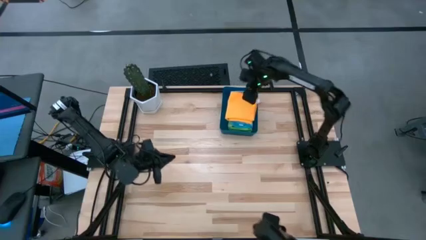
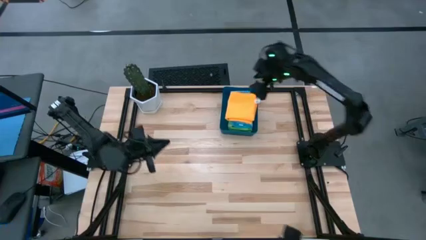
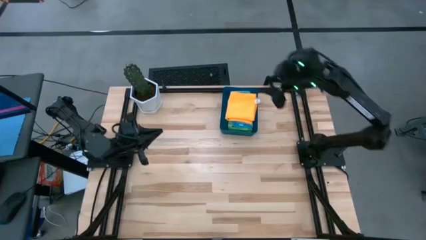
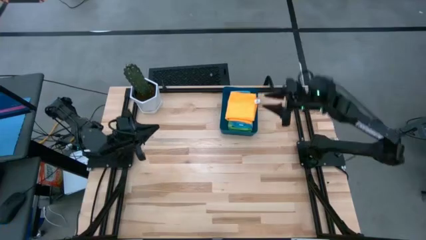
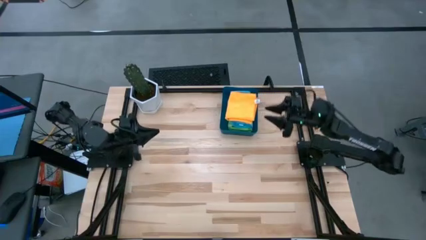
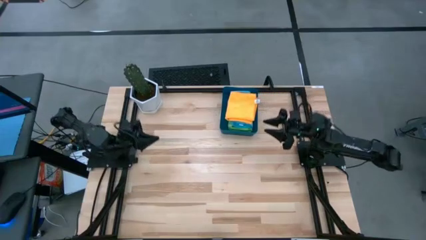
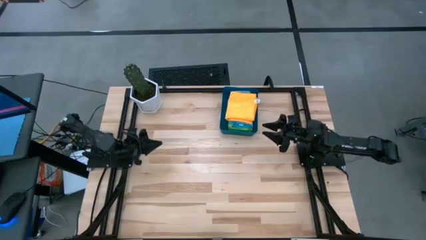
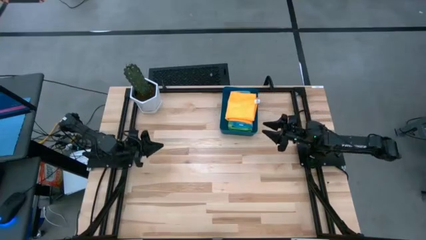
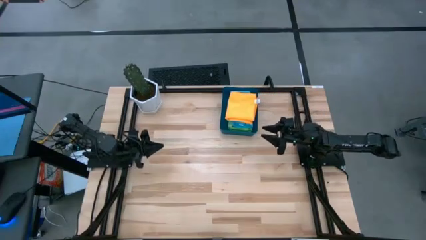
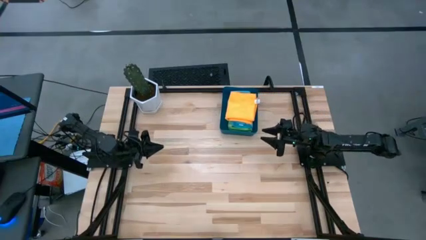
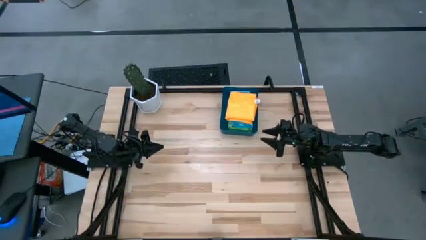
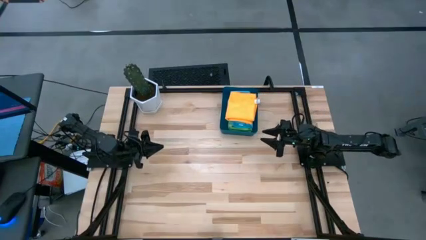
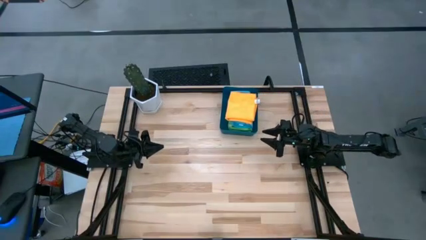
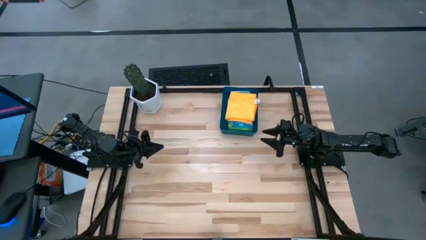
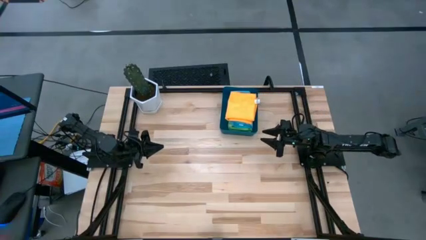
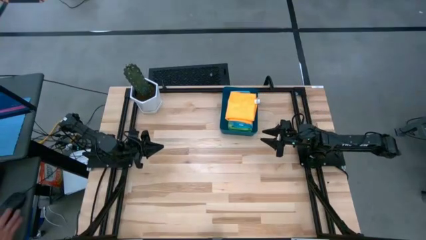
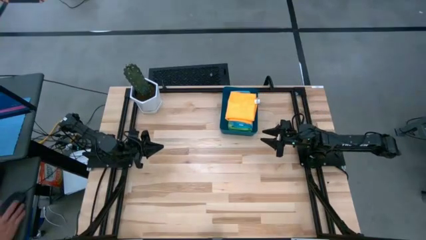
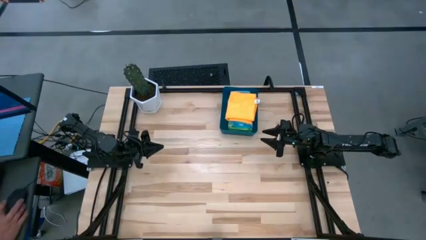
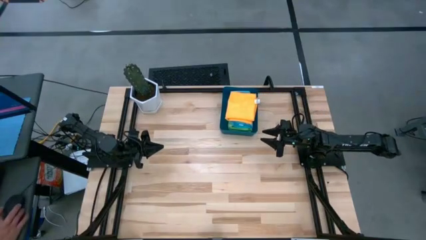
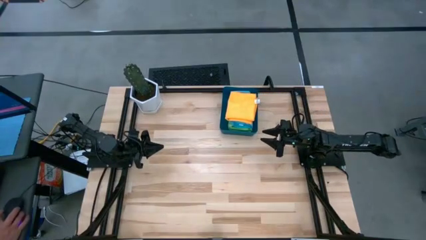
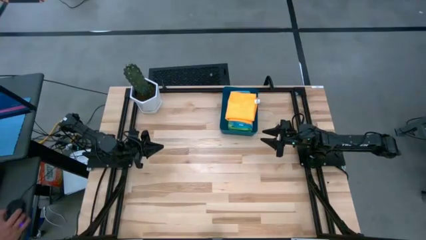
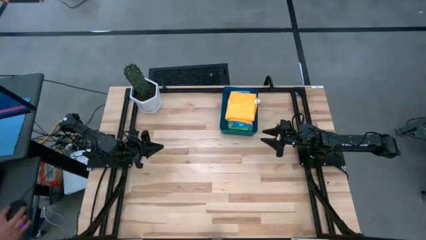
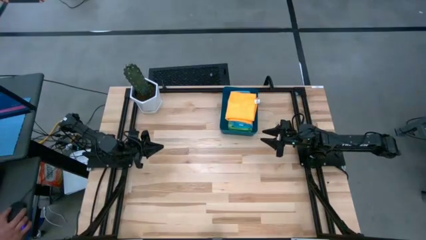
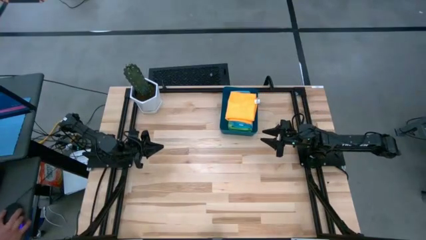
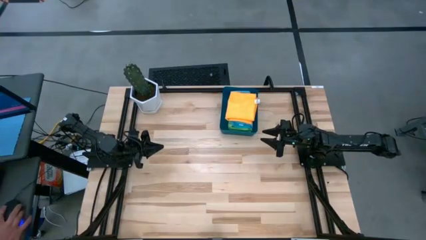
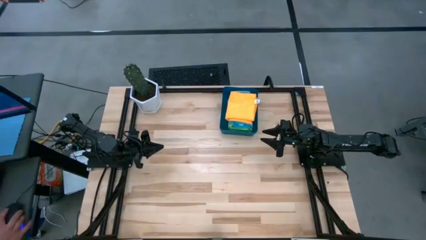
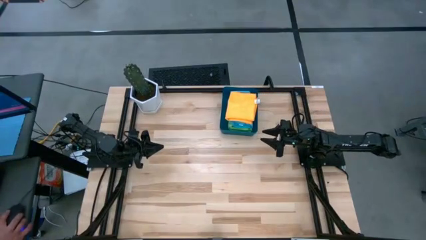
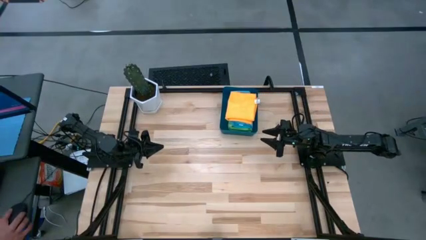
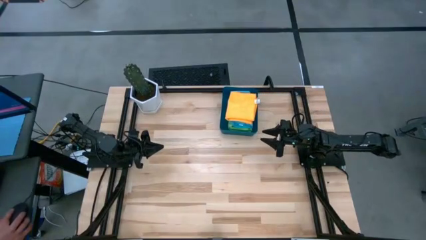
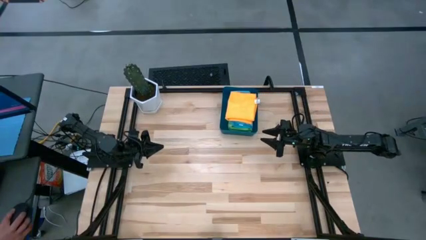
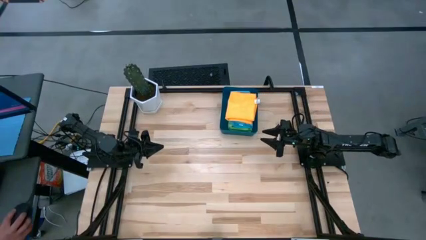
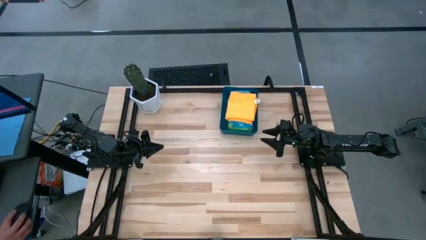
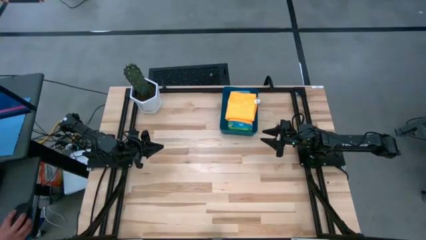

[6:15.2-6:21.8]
Task: Fold microfiber towels
Return To Home Position

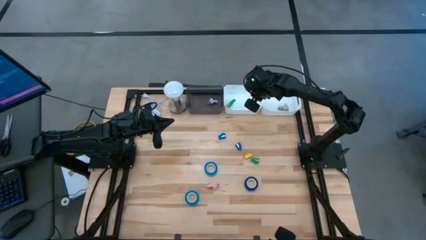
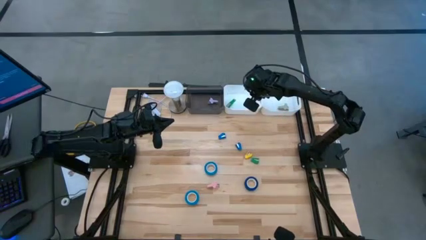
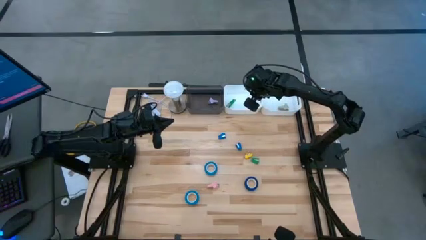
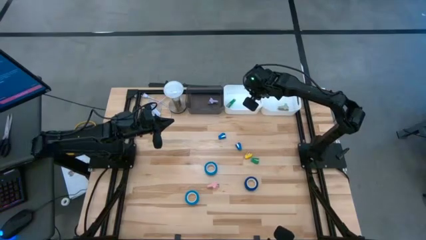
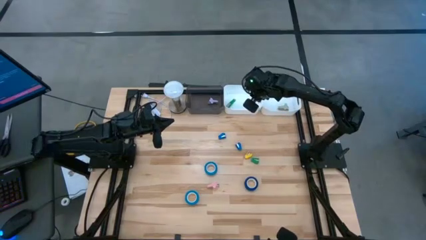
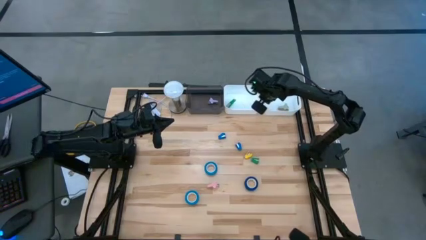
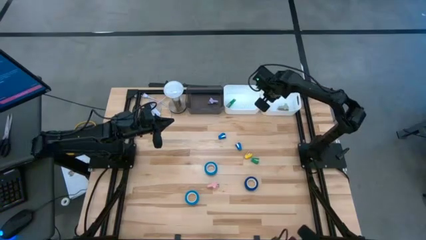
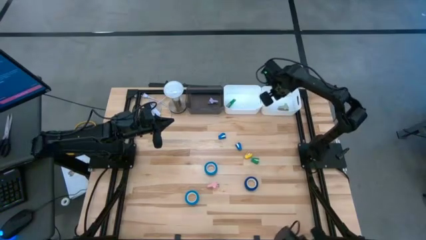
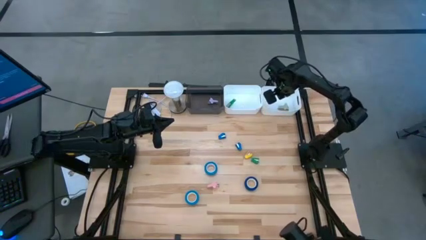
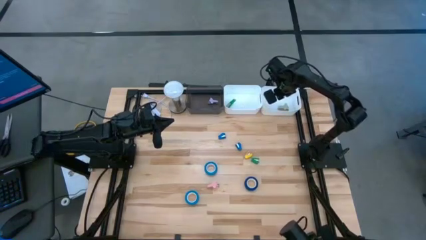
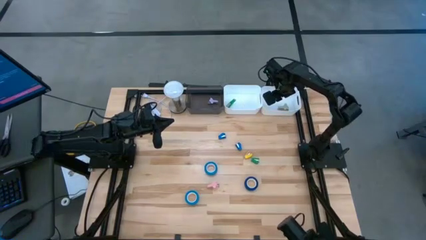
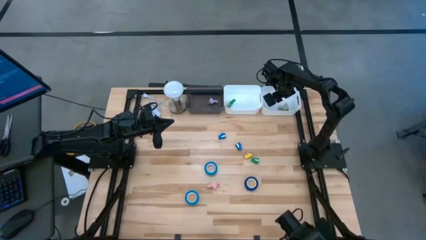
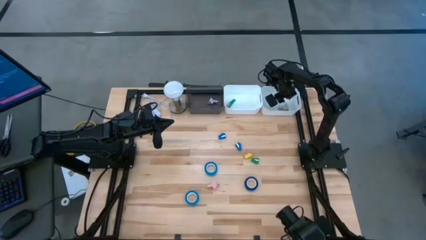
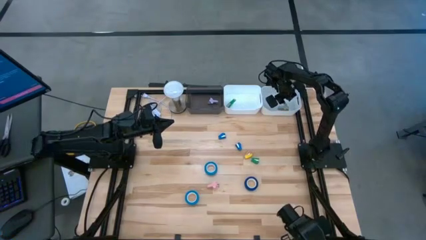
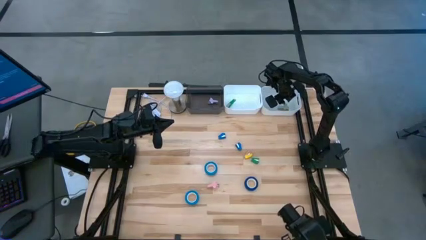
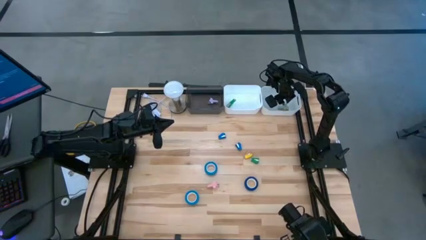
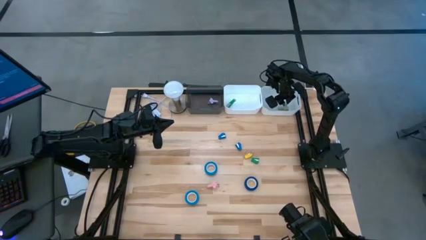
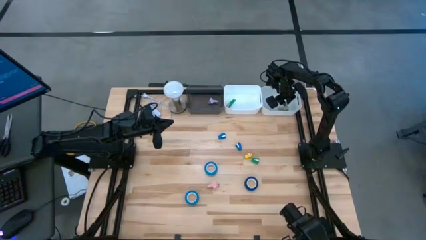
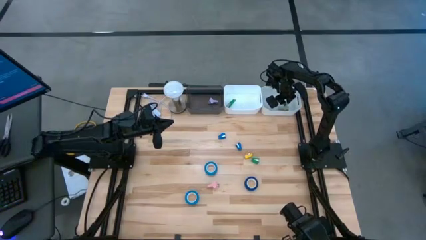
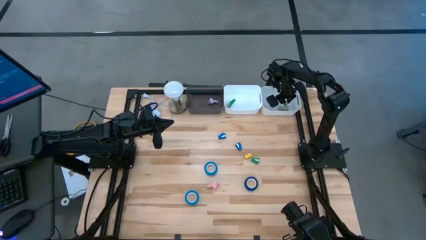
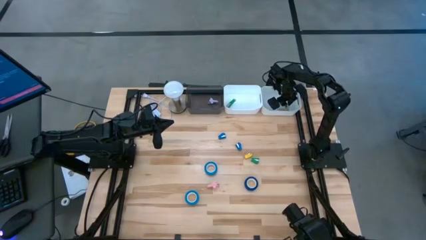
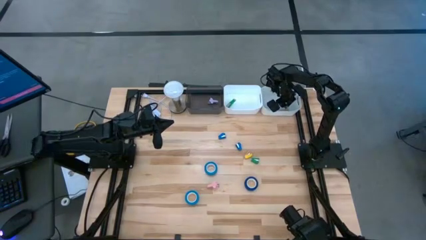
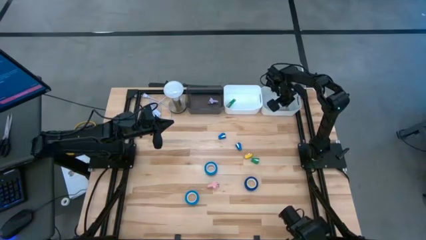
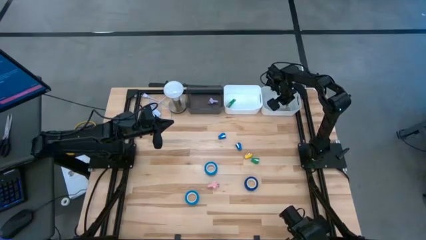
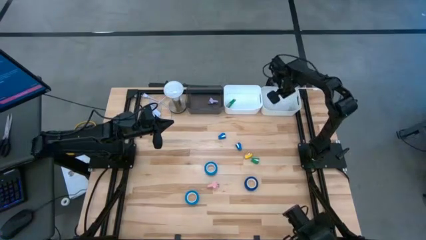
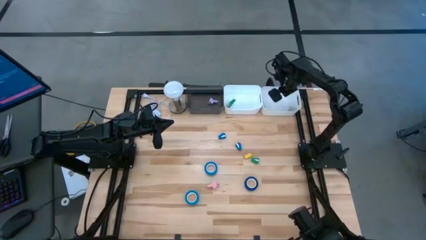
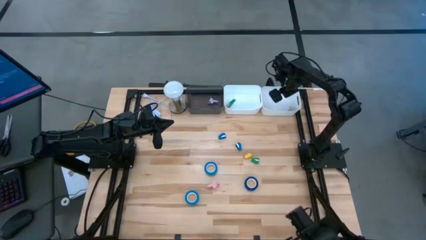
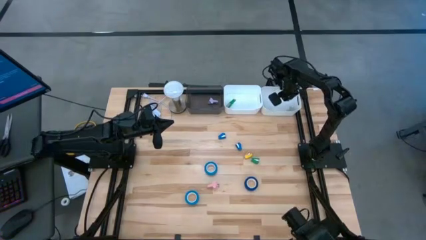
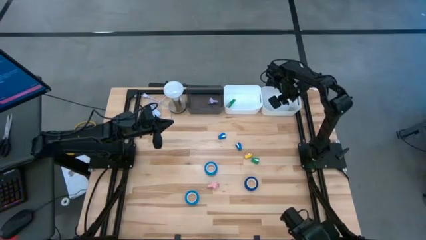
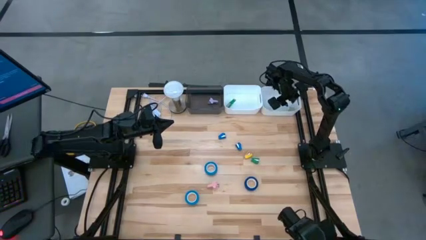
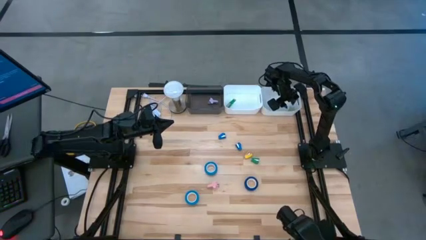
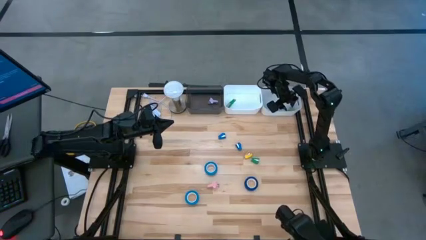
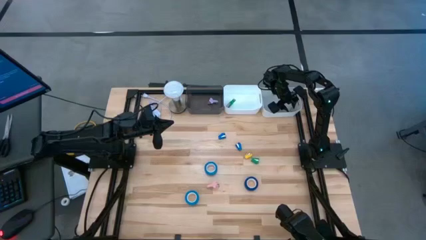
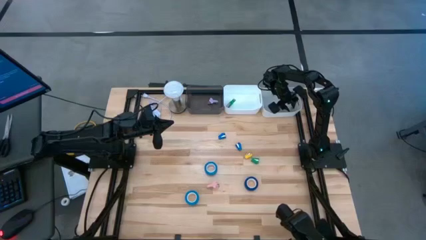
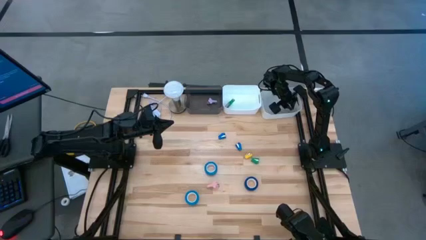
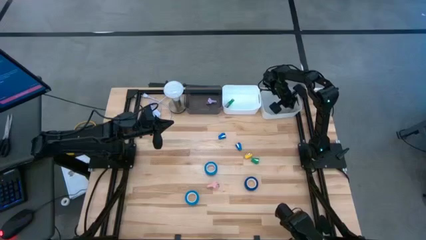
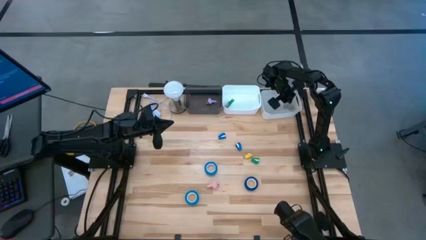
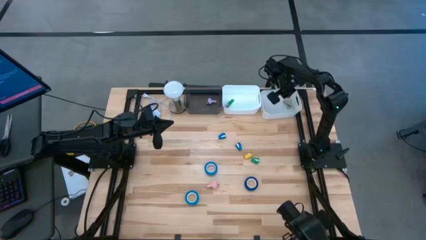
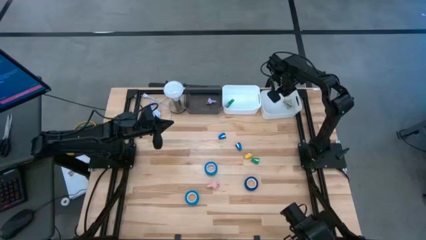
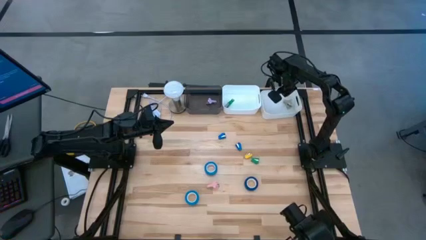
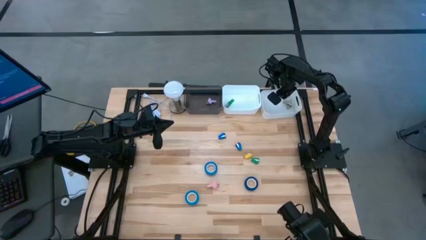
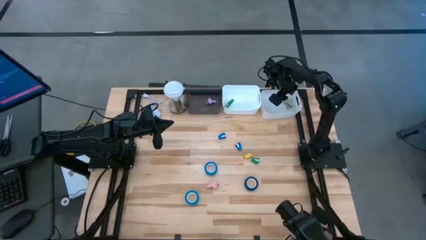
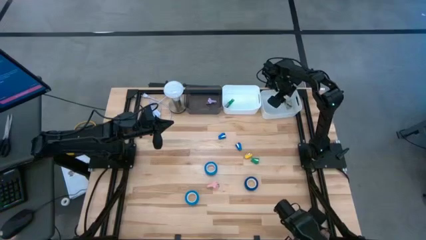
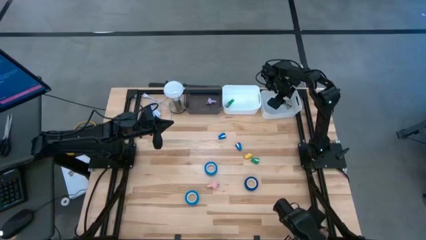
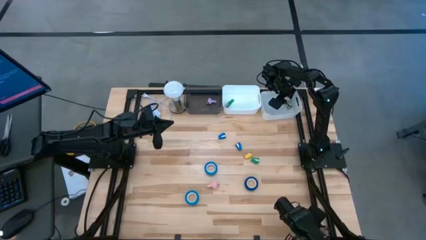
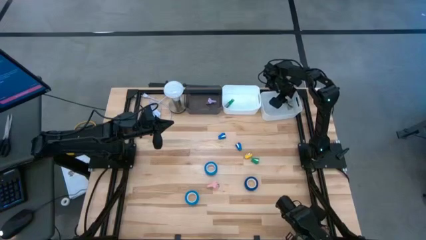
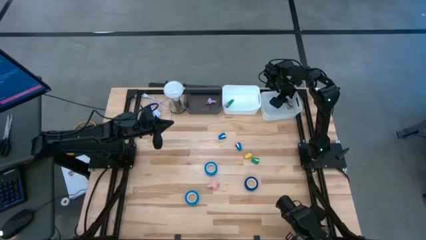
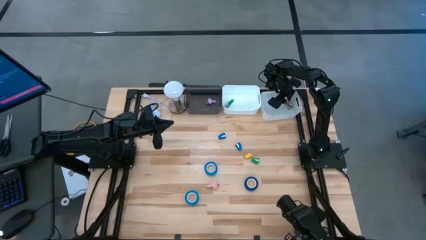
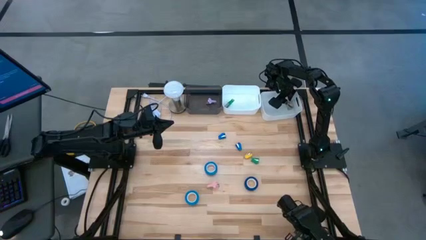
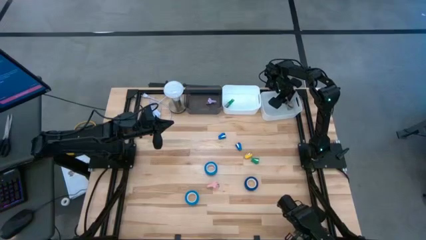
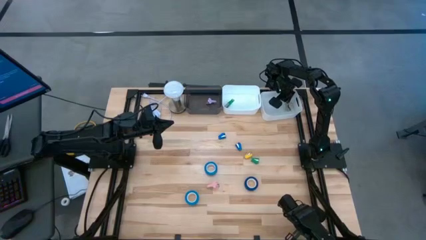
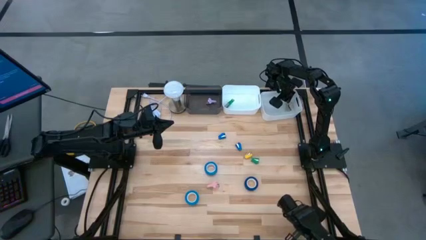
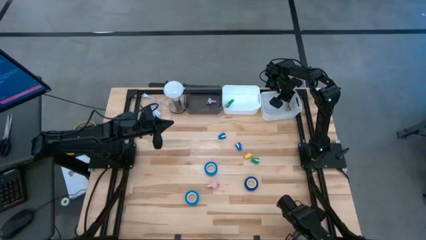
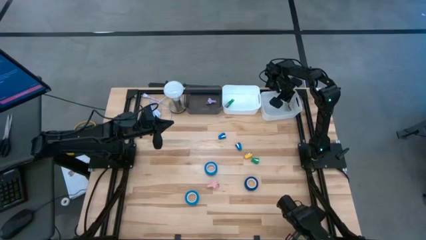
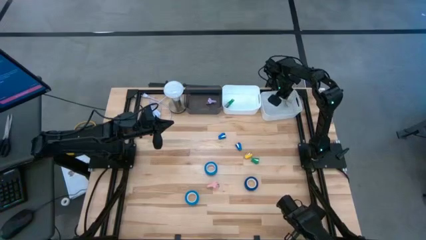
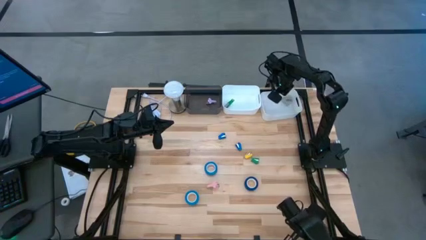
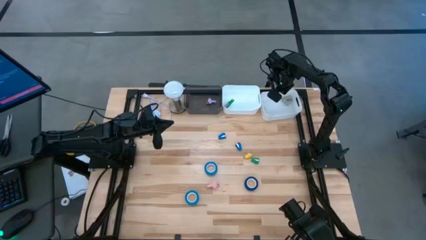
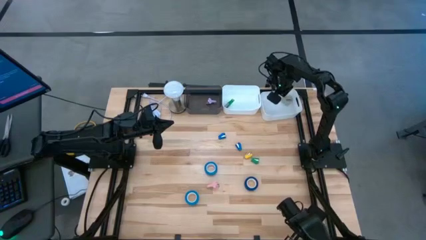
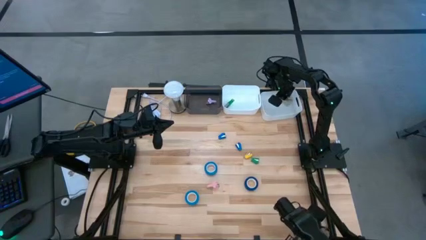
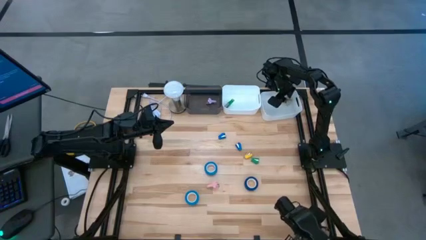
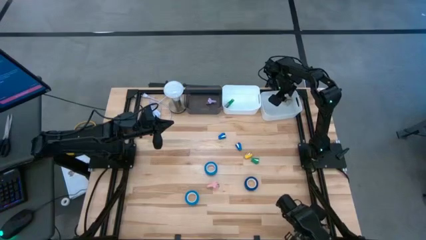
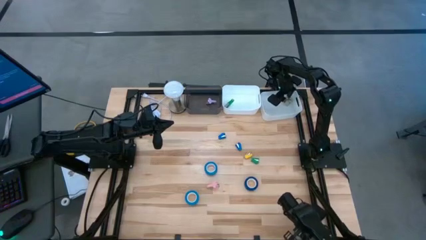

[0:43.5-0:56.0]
Task: Pick and place Stapler, Stapler remover, tape
Put the gray staple remover into the black bin
